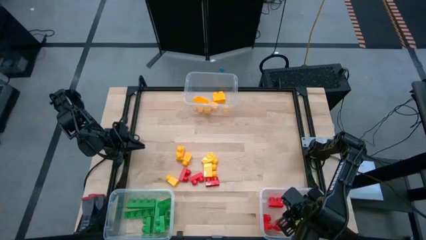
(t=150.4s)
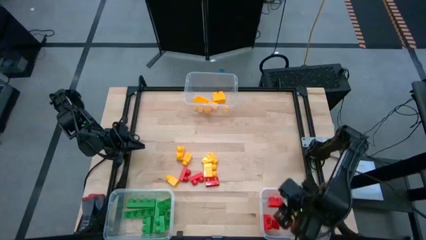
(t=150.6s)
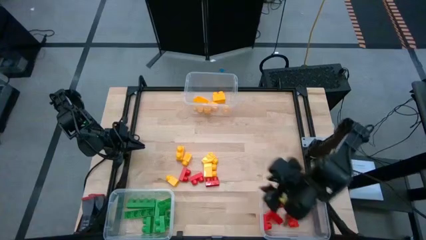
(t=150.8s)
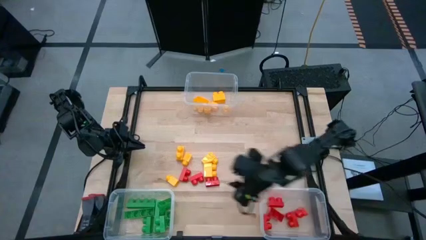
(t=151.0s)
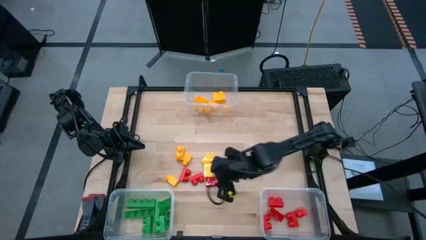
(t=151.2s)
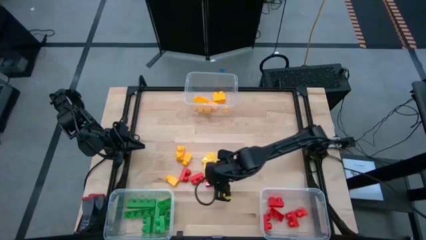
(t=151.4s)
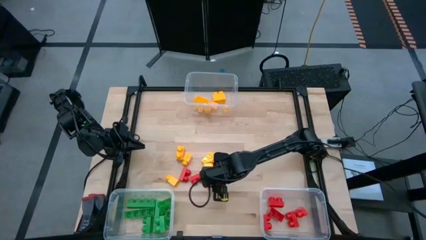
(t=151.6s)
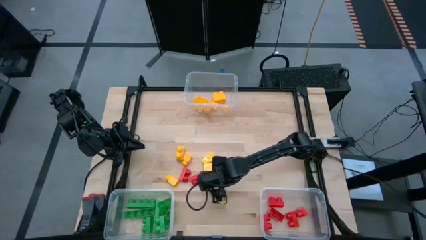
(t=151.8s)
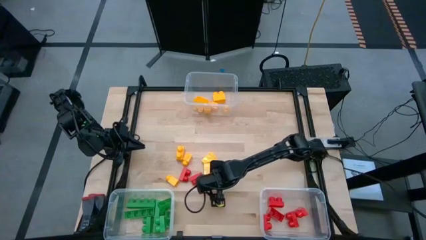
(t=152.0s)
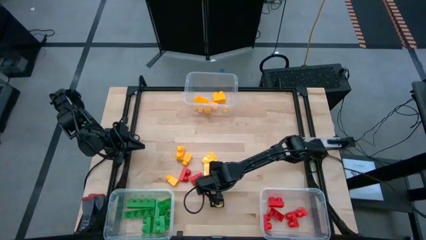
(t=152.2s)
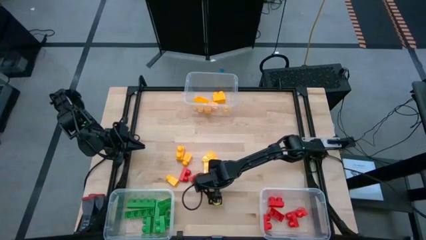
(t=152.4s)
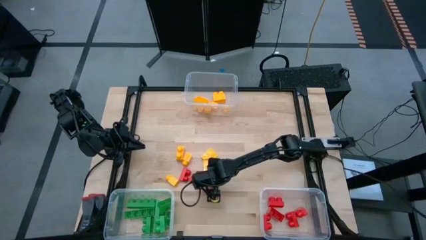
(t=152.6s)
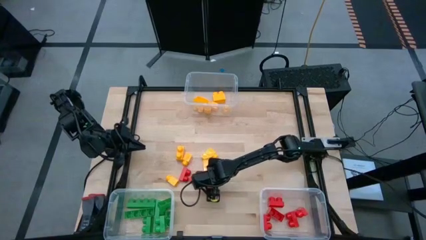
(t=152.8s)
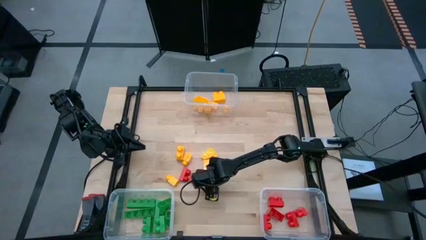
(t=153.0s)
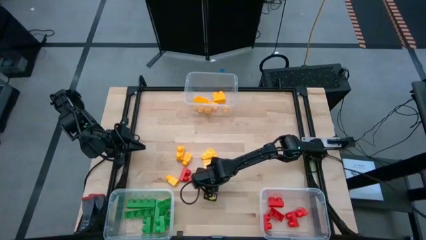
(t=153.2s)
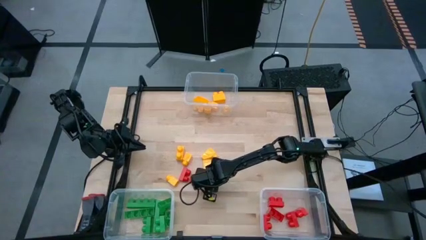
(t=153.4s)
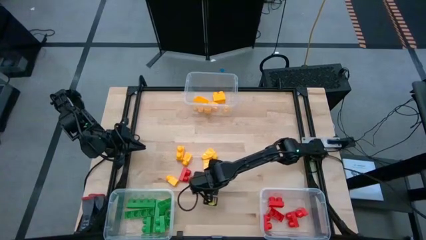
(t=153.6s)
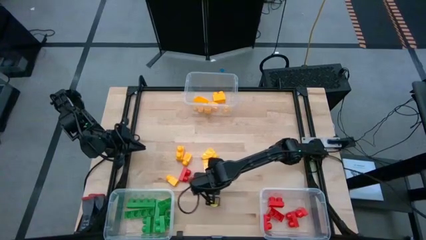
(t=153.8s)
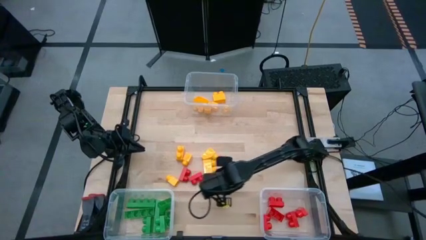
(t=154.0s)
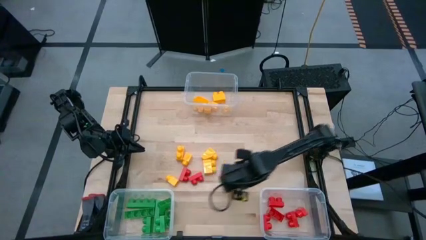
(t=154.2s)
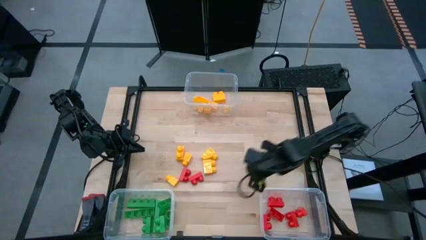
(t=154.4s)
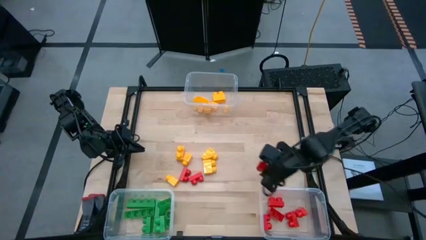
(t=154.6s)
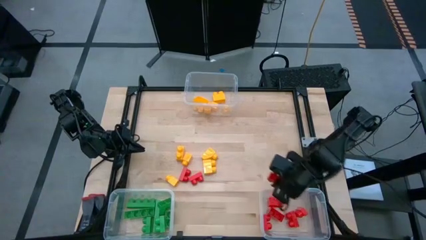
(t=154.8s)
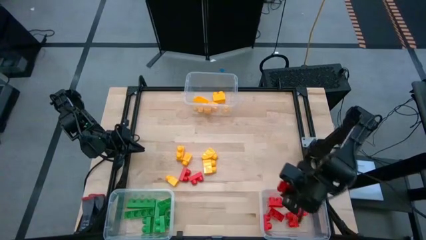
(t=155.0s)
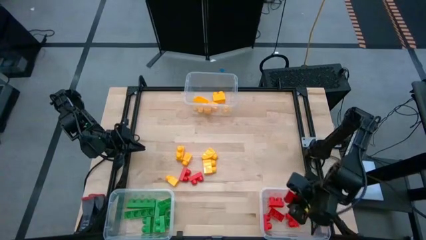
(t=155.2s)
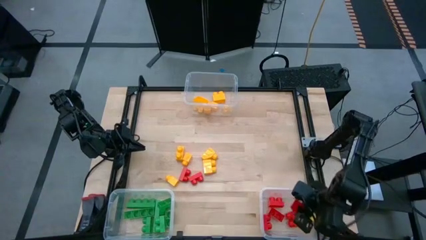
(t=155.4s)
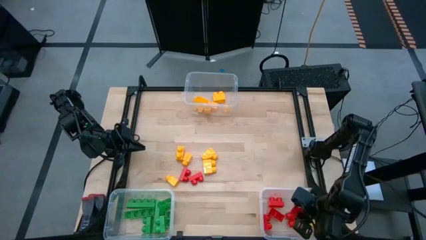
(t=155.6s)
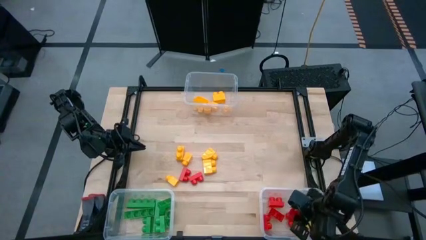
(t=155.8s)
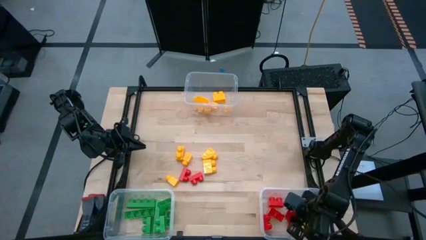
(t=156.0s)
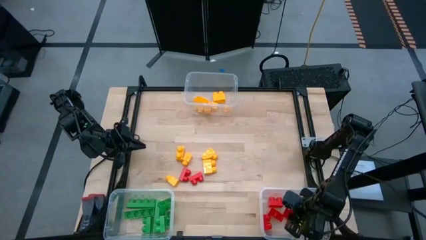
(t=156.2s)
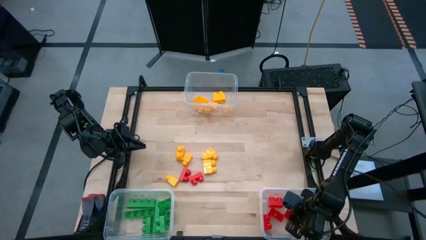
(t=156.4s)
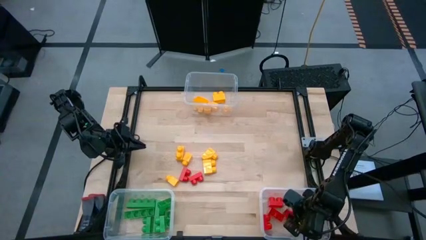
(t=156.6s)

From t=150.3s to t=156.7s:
Task: Sort blocks
Put the red game piece into the bottom right transparent bin

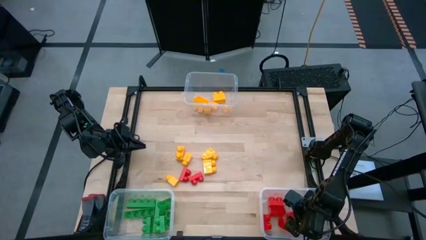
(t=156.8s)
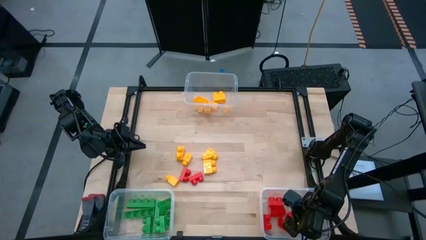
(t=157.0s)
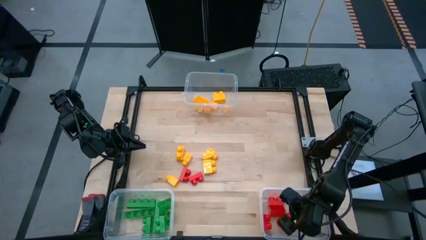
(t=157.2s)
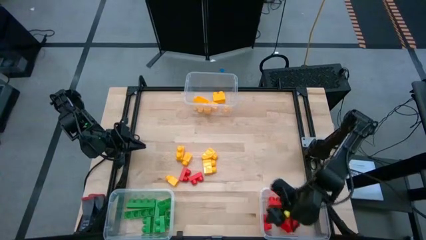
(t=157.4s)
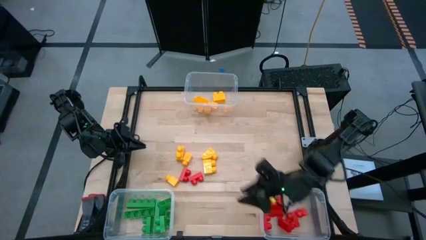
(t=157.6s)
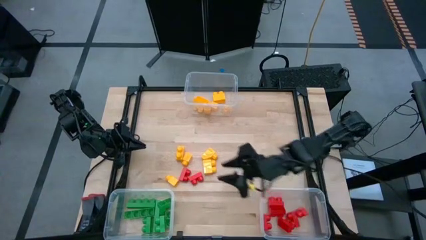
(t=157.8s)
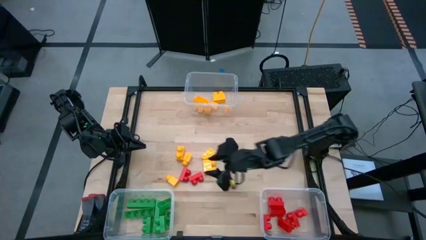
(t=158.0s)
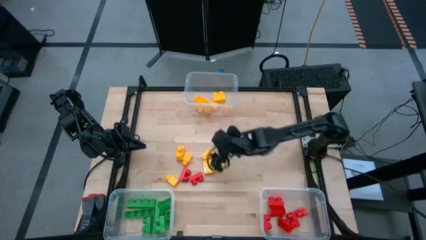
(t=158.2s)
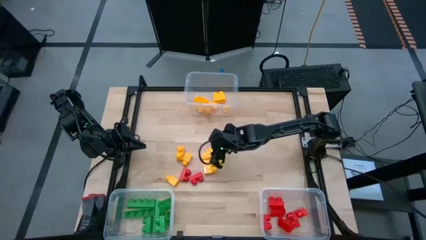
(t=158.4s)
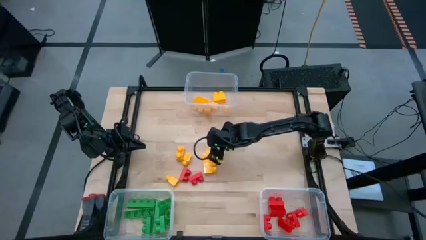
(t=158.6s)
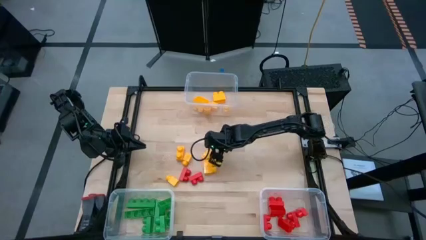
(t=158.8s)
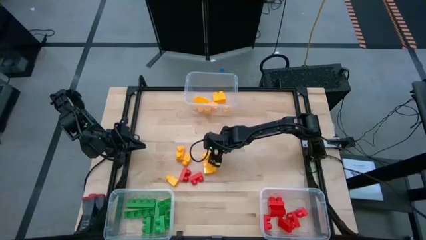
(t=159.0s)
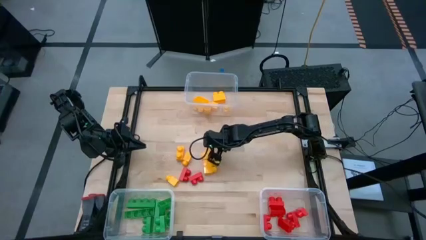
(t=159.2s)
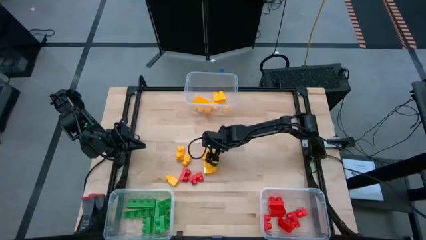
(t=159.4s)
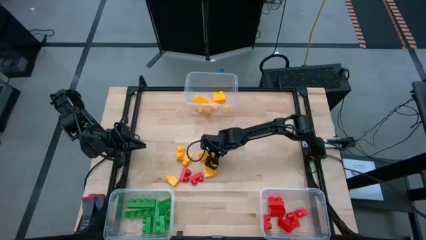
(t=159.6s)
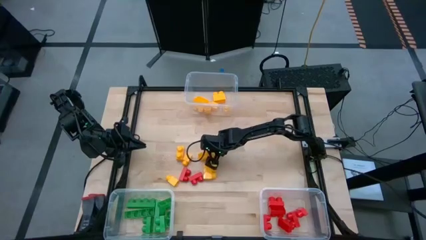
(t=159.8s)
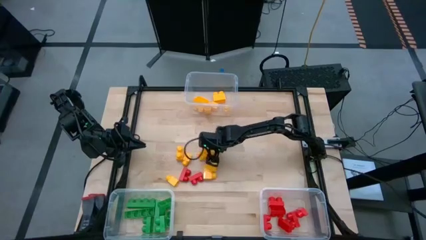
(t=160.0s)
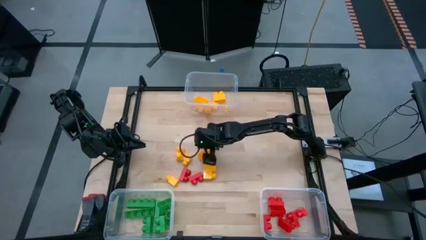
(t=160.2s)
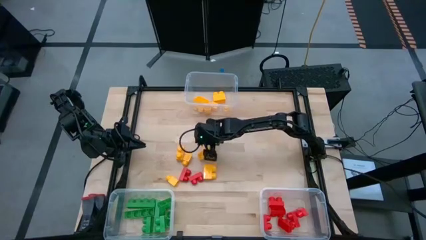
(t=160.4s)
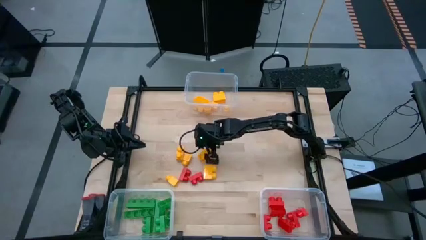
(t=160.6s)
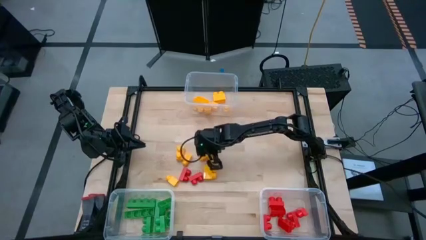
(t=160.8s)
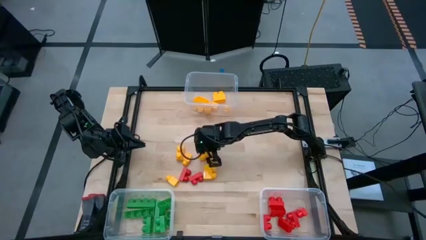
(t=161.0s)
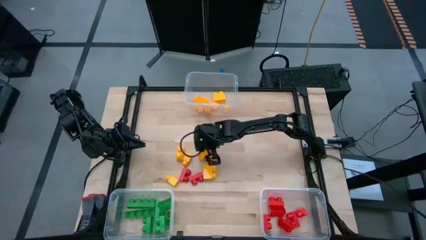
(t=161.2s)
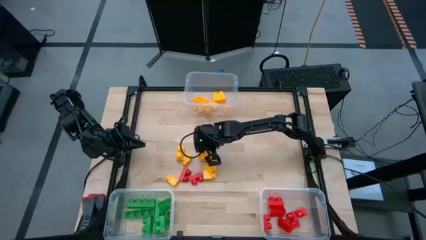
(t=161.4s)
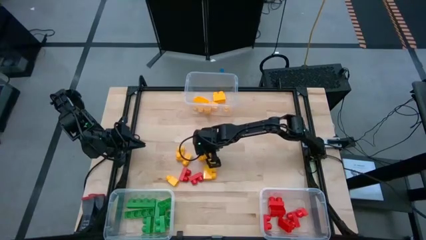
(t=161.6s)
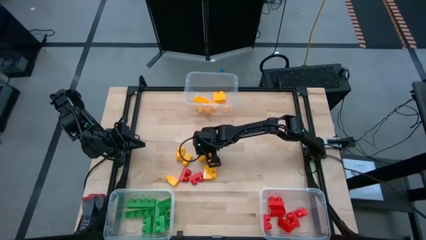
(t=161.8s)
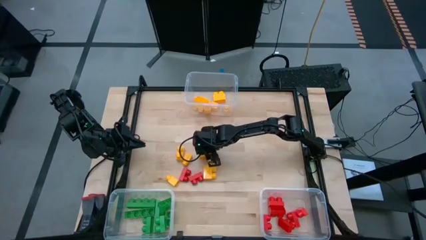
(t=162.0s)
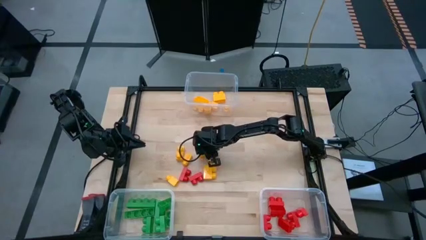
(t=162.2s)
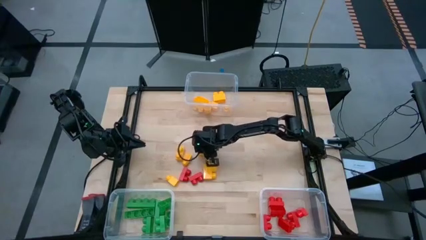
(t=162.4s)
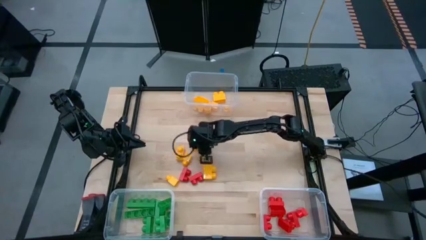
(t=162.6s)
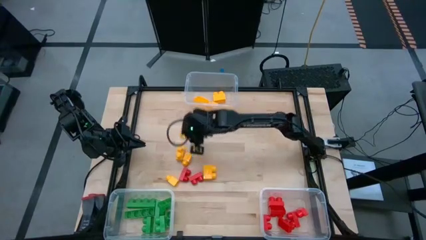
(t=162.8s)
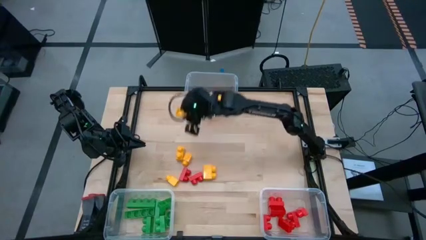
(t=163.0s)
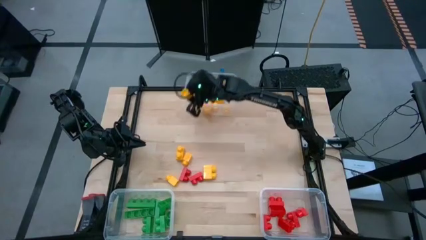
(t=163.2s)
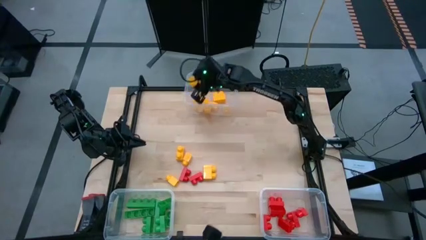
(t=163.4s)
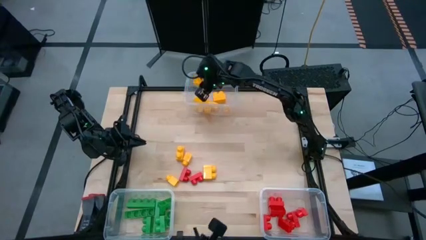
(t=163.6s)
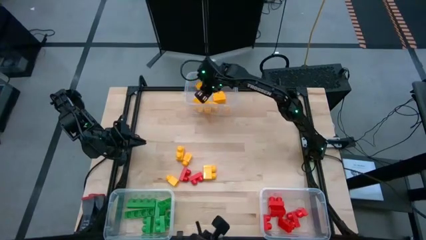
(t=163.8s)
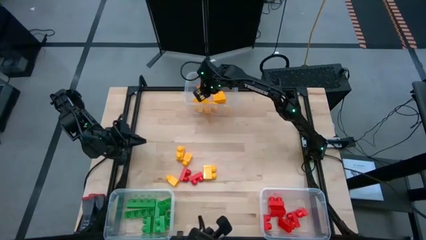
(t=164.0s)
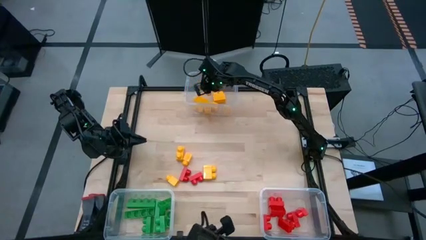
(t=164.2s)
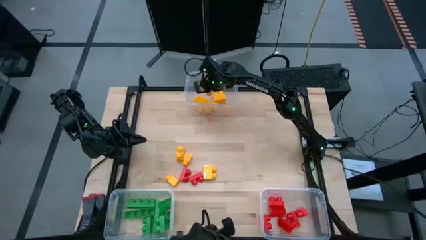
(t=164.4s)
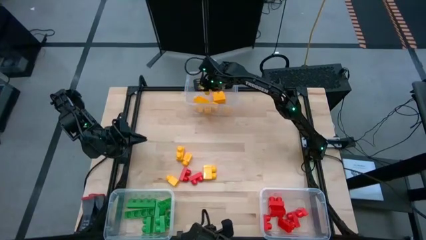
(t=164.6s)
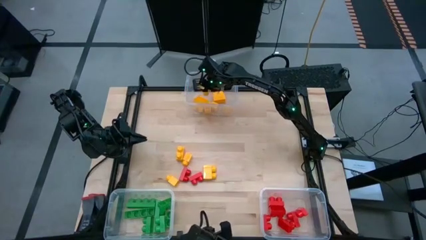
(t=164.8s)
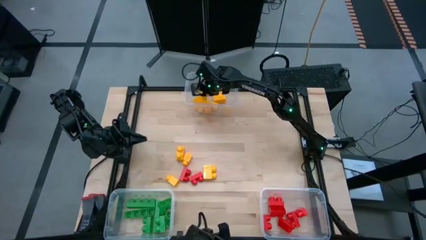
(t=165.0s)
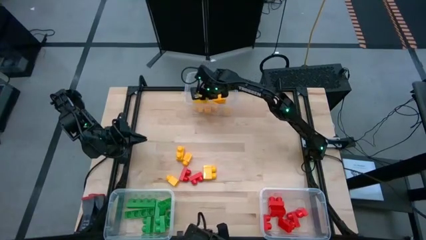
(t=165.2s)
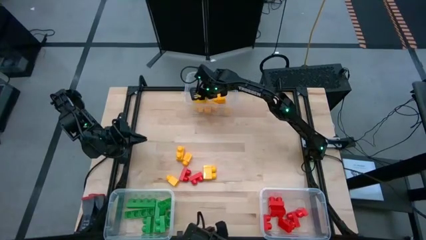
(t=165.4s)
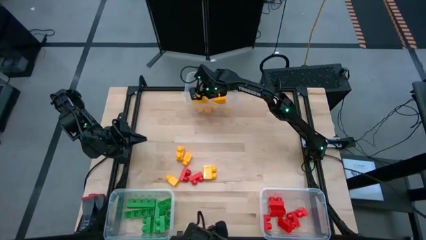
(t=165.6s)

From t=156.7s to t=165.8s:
Put the yellow game piece into the top transparent bin

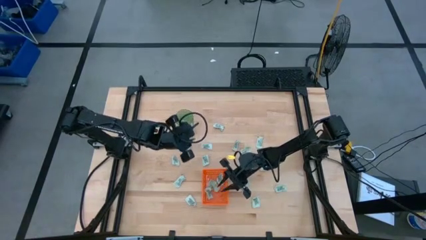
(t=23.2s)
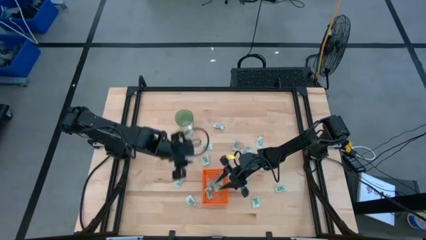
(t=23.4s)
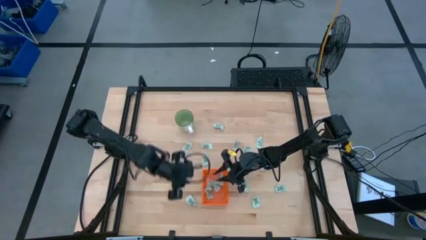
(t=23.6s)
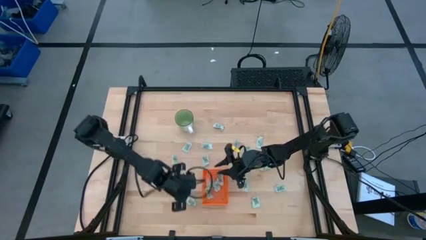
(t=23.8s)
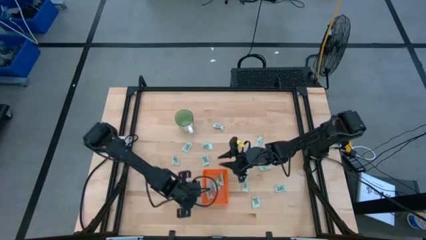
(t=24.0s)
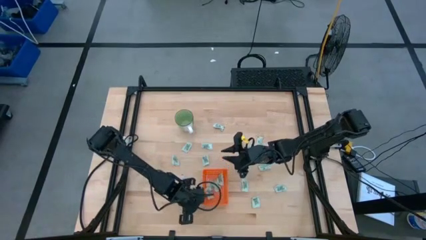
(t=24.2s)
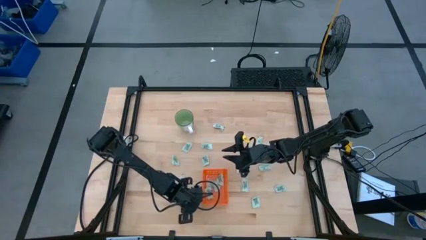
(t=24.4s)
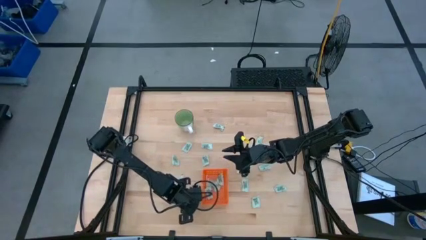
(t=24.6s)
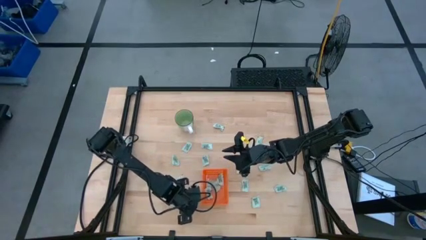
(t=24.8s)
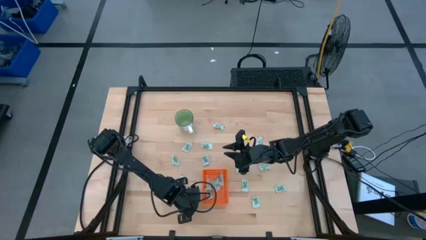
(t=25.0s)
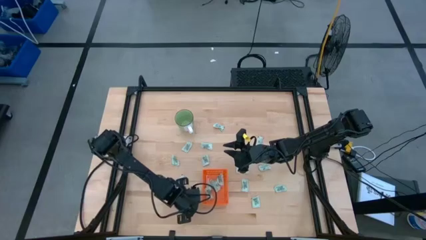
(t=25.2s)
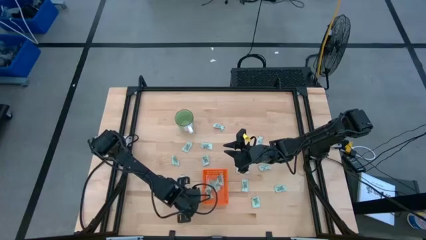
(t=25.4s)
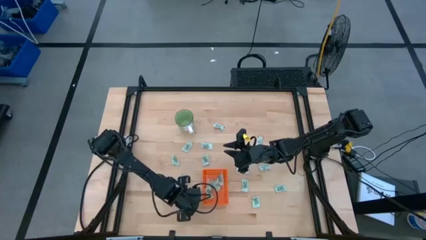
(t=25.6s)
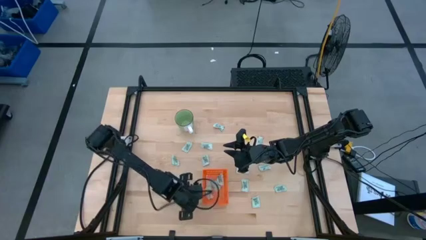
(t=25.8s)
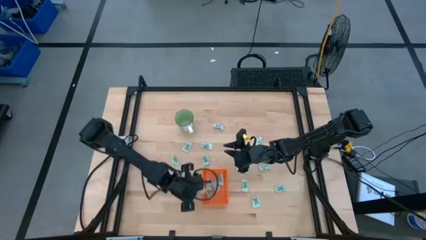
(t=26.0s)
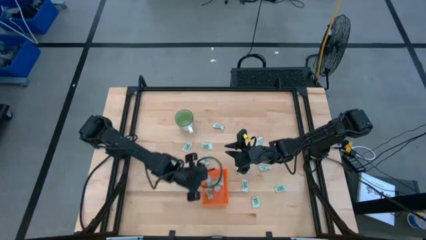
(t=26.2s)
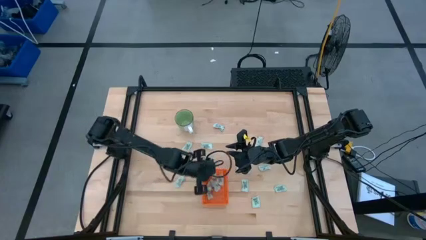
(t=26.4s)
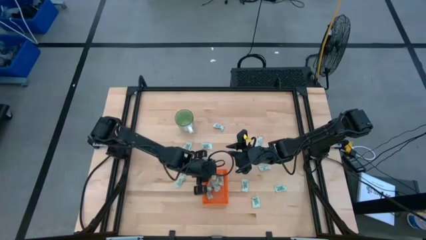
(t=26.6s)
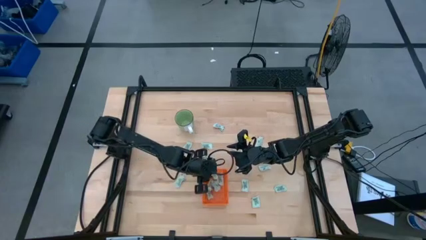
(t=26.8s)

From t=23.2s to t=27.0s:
Task: Pick and place Stevia / Truvia into bins
Put the stevia packet into the orange basket
